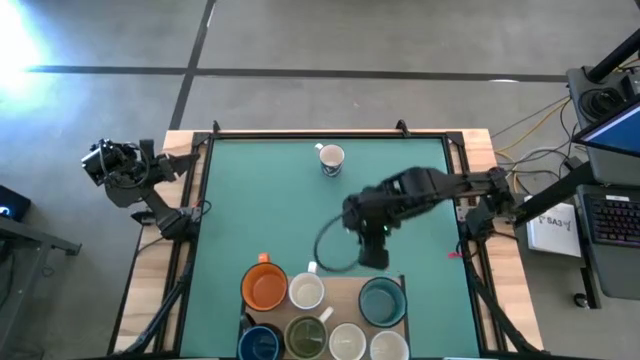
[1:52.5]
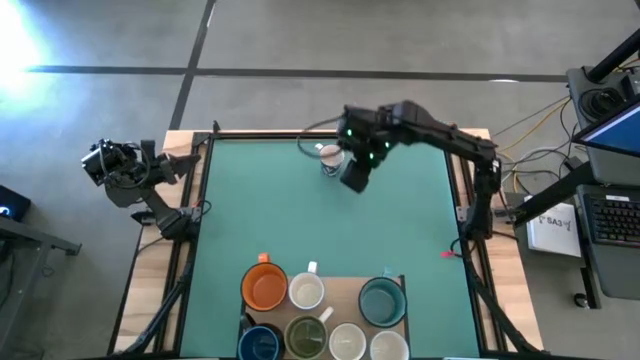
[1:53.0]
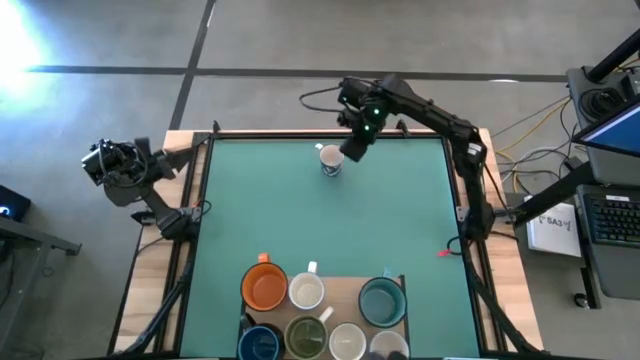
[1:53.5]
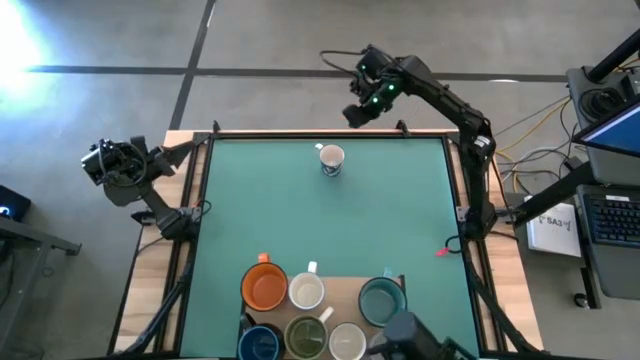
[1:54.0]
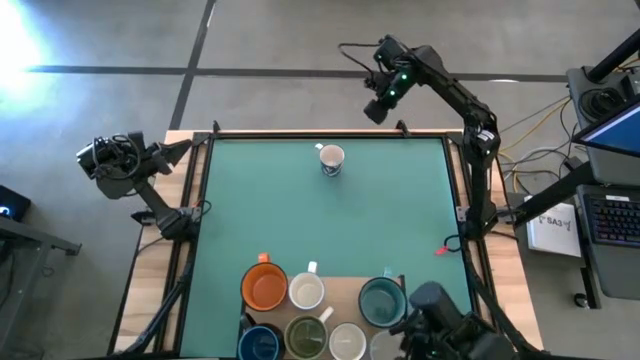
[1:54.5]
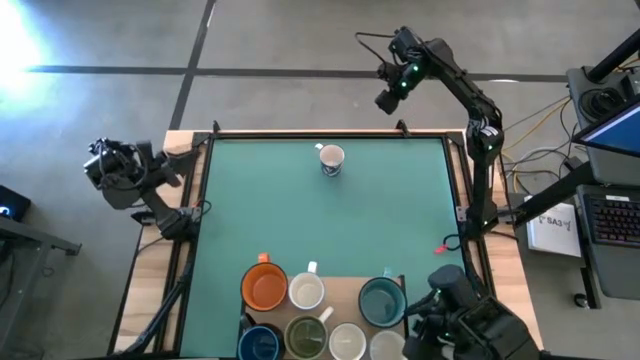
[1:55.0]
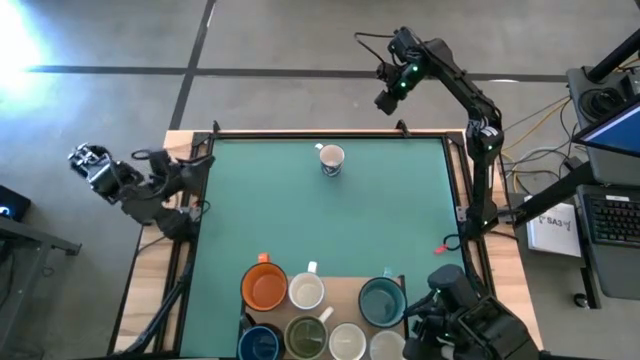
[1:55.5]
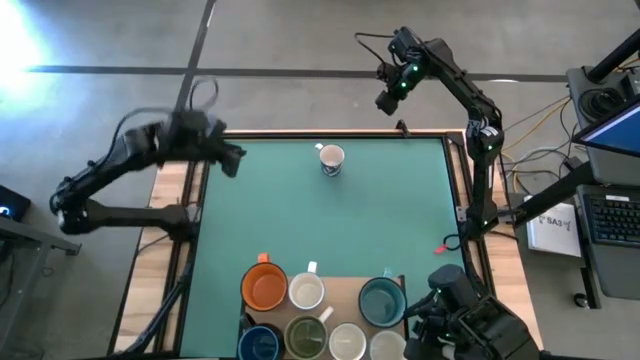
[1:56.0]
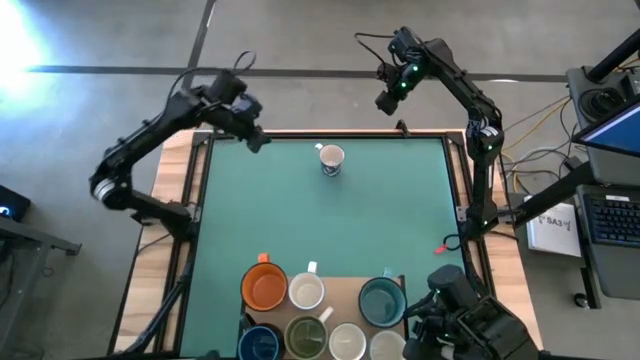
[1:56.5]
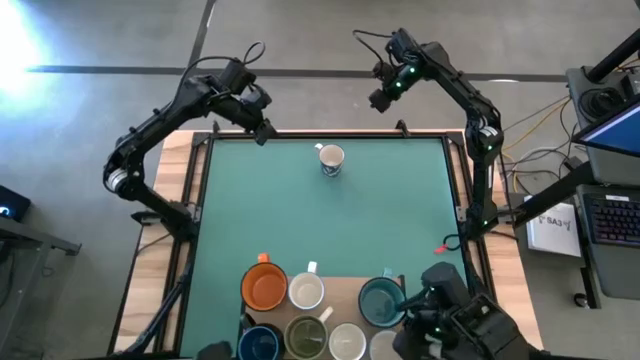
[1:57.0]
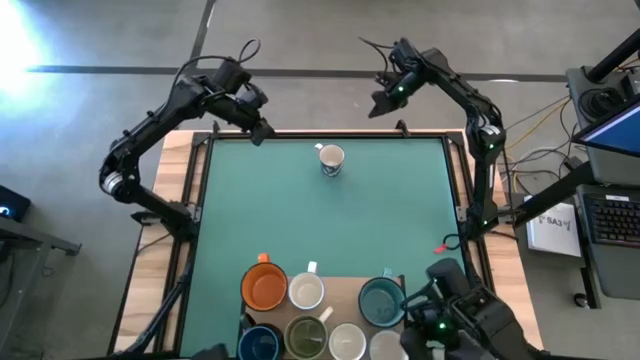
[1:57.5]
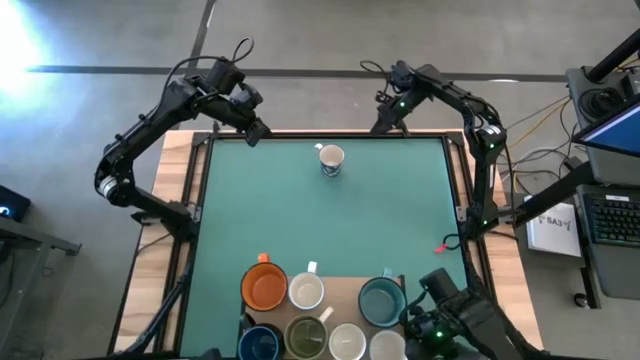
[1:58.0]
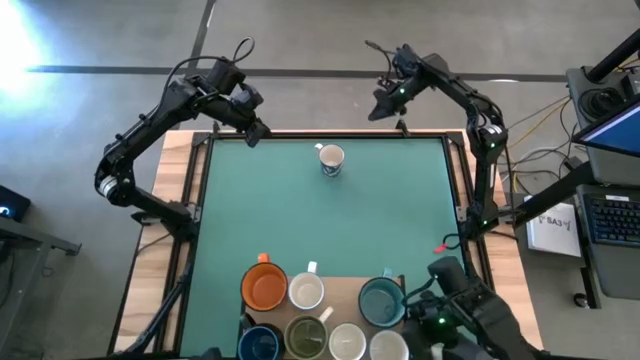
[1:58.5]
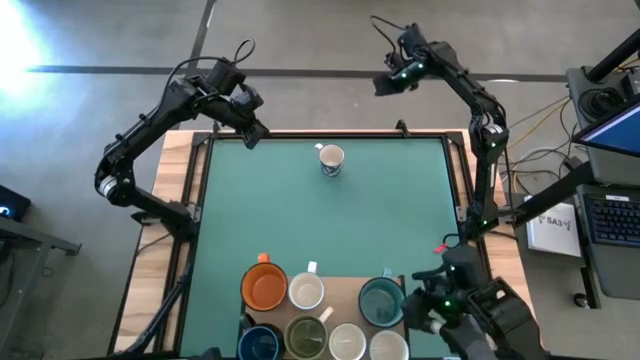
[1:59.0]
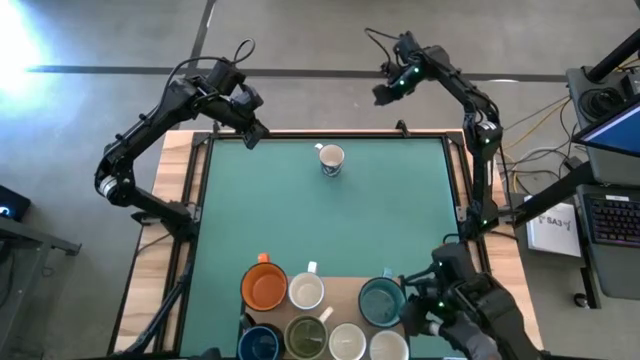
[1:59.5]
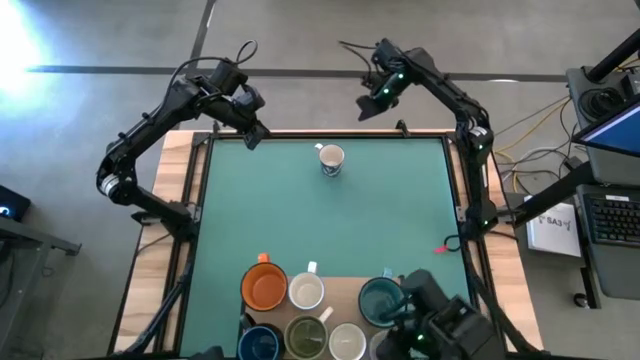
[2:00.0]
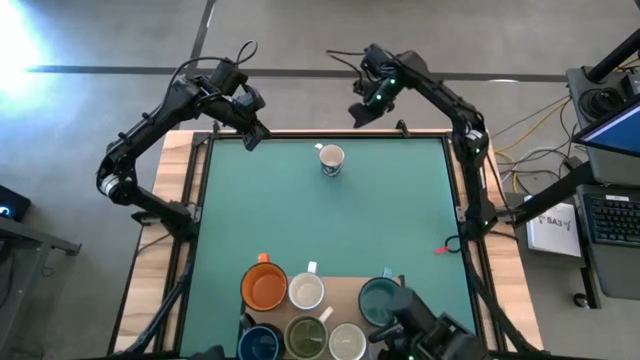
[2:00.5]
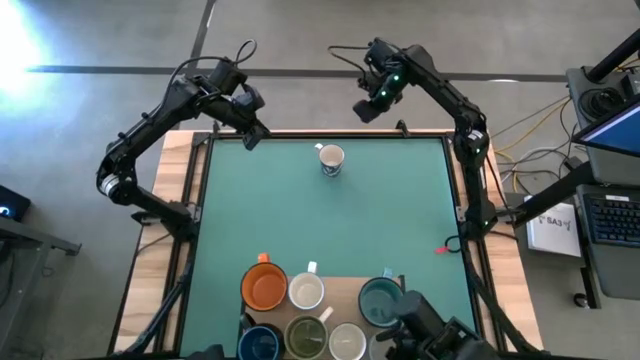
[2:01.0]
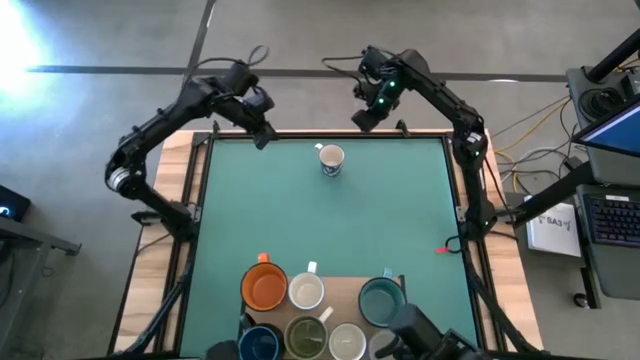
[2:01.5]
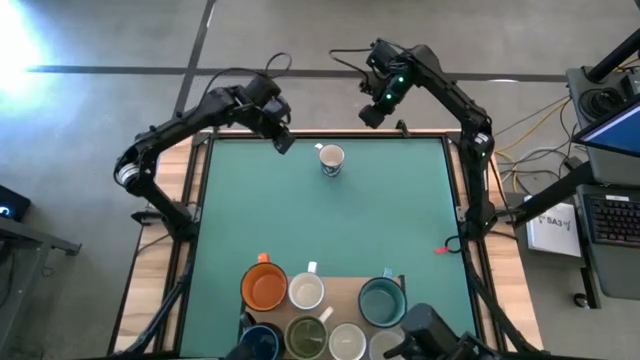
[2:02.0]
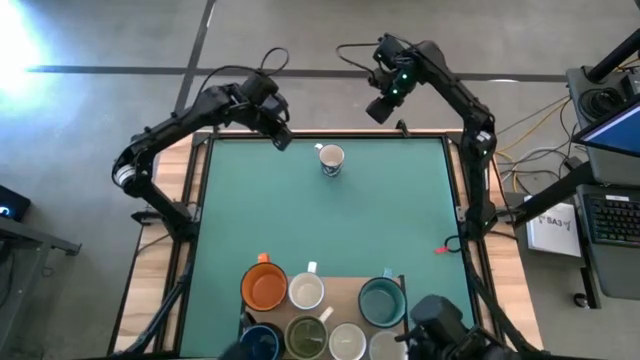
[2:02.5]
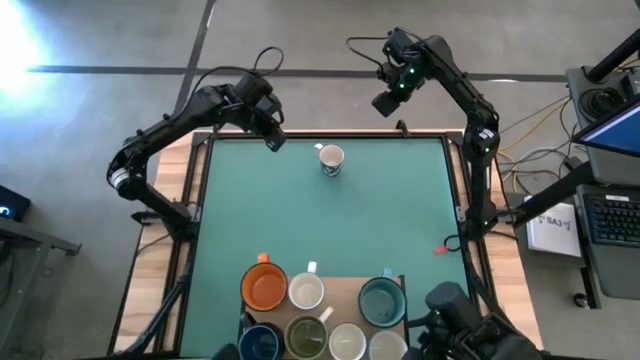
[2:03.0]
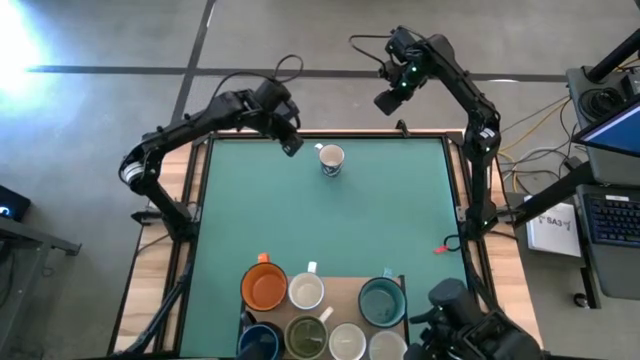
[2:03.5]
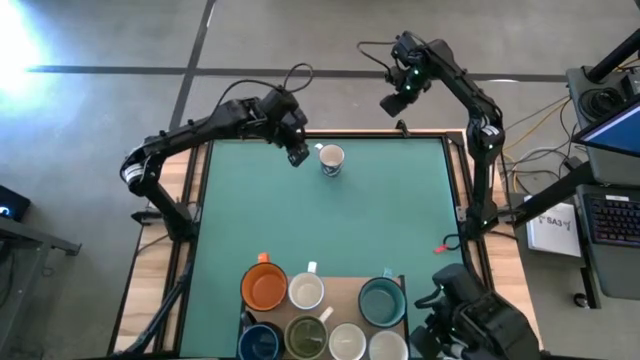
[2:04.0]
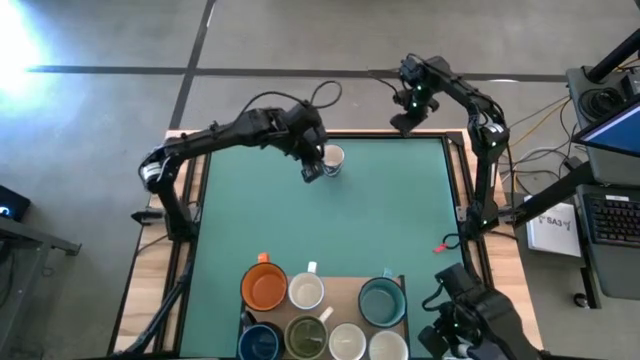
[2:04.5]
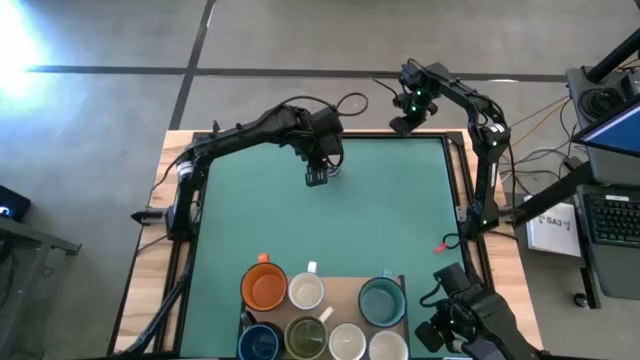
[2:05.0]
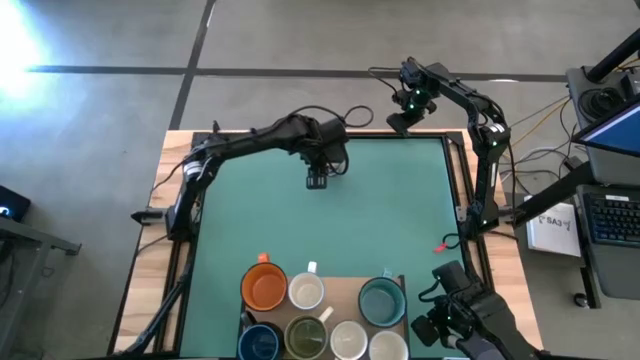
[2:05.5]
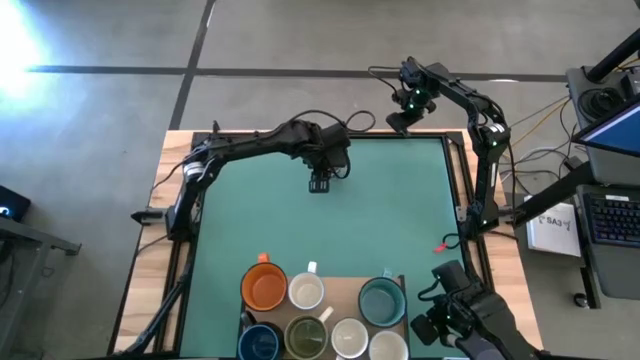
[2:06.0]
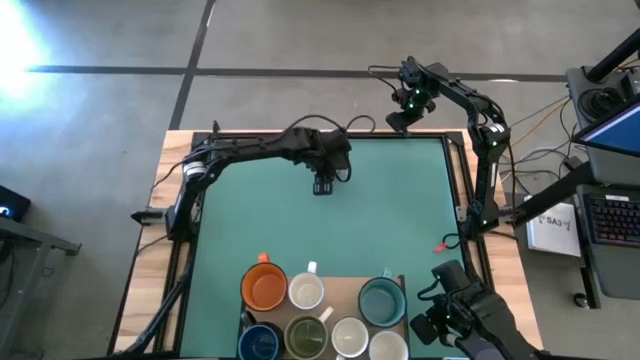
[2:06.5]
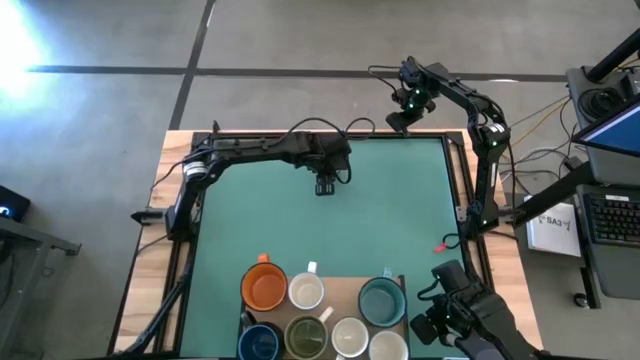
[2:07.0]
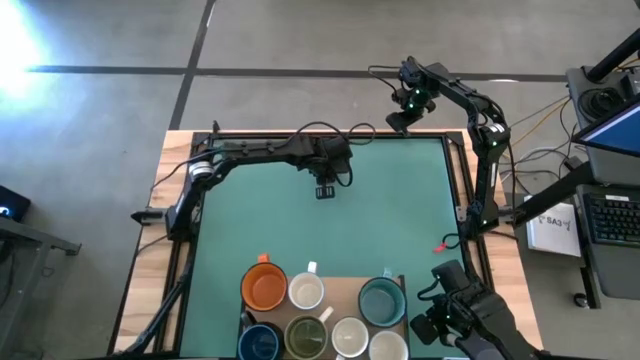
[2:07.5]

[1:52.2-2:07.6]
Task: Place coffee mugs
Put the blue patterned mug on the shelf

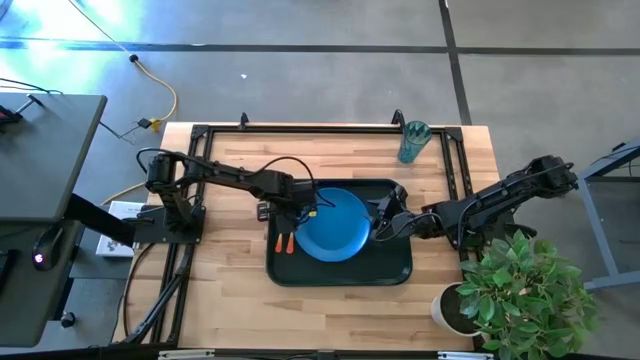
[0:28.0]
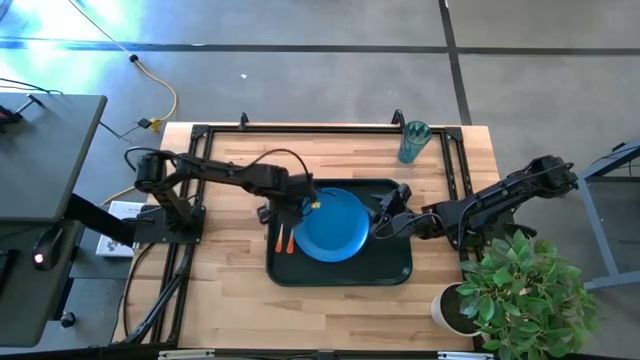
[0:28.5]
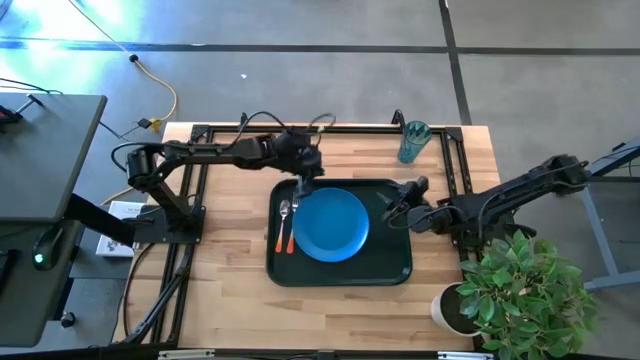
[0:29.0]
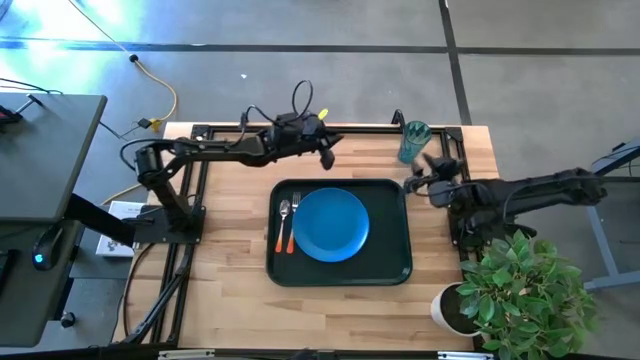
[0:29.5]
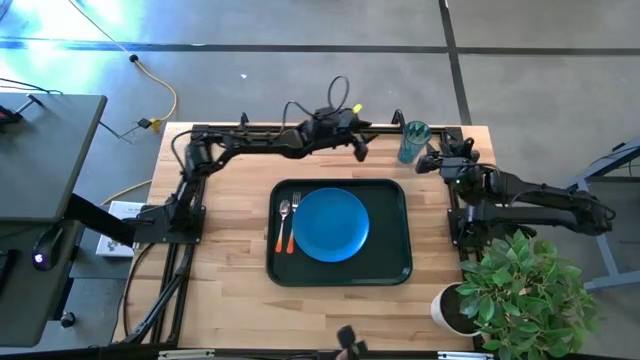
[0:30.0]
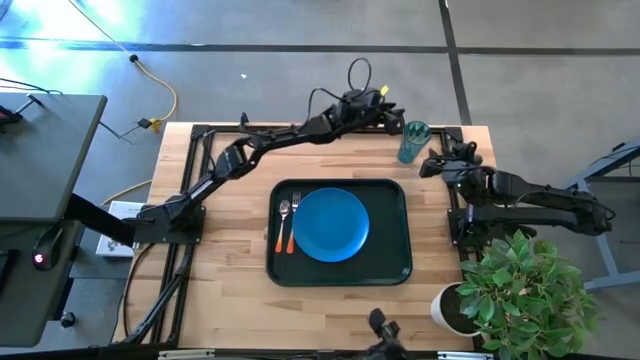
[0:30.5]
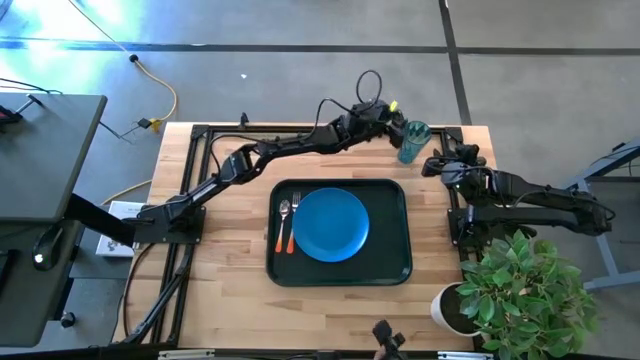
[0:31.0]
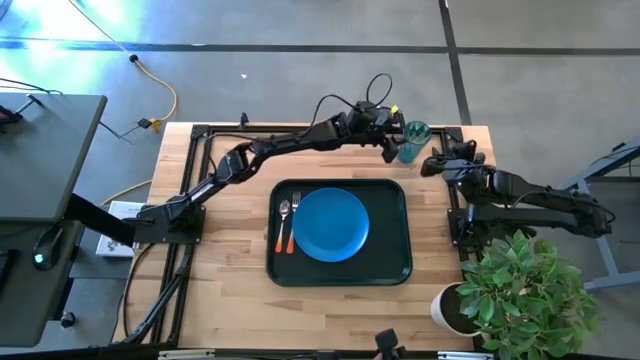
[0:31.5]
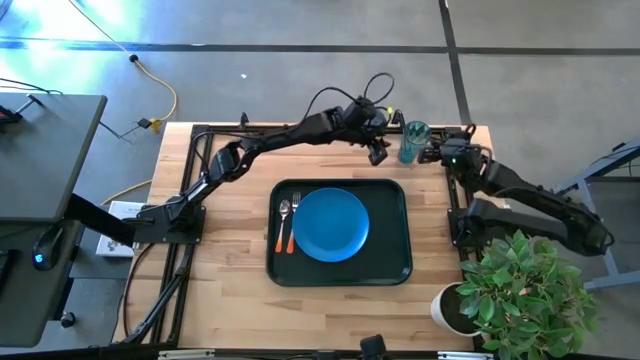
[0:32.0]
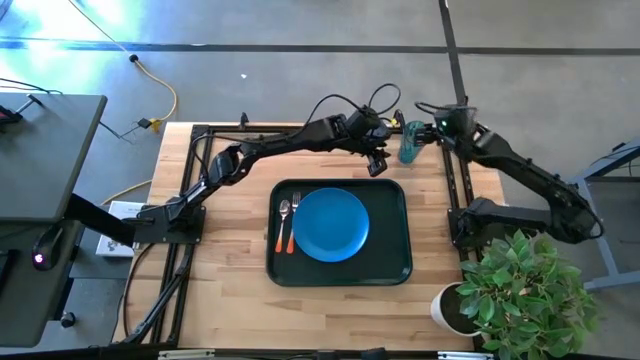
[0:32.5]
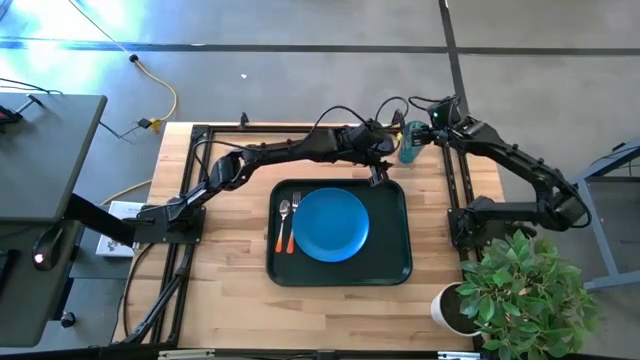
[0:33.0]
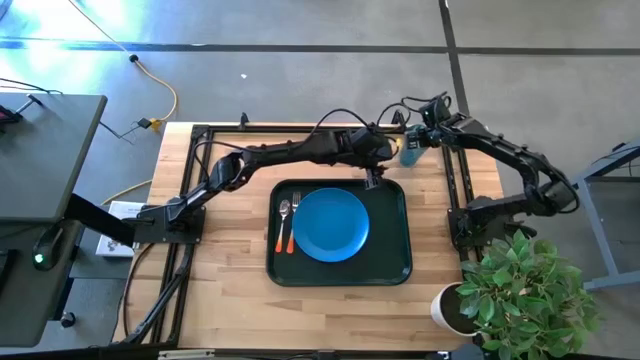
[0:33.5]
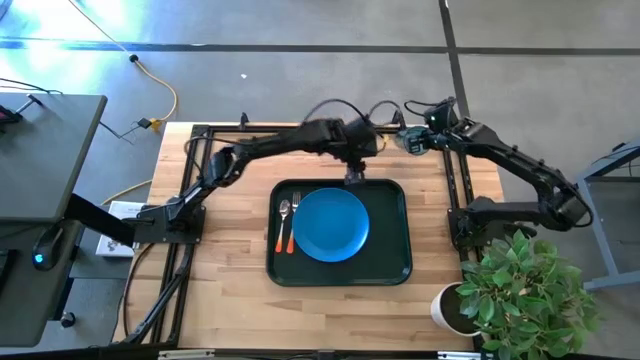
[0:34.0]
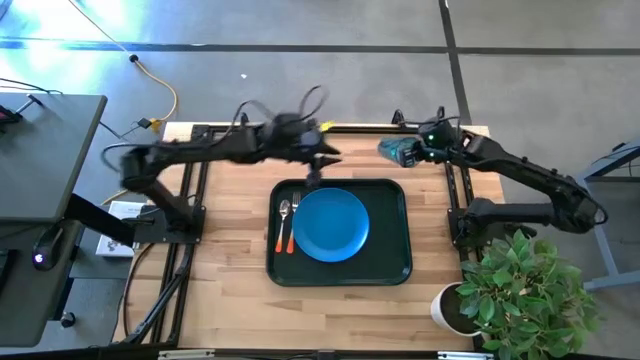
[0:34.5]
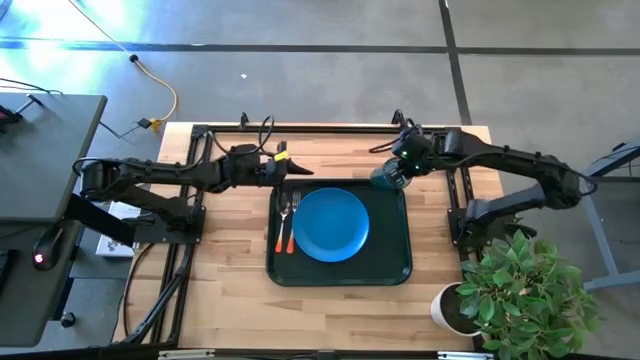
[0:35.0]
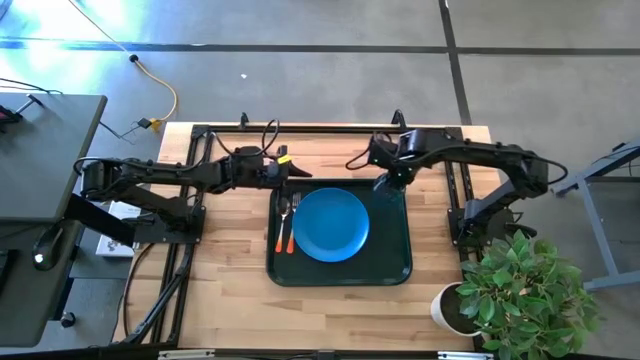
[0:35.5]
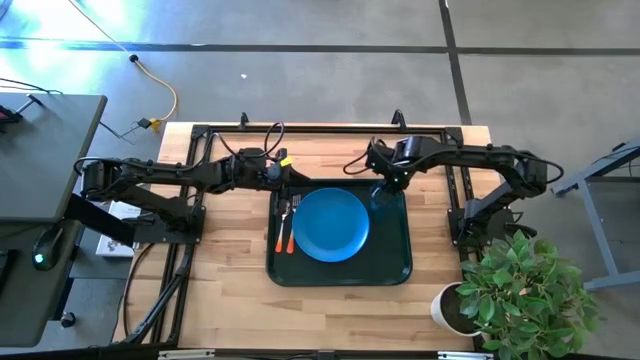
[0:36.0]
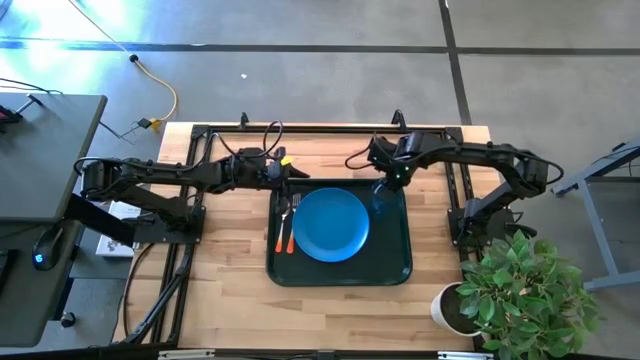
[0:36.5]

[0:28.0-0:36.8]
Task: Pick and place plate/cup/fork/spoon on tray
Put the blue cup to the top right of the blue plate on the black tray
